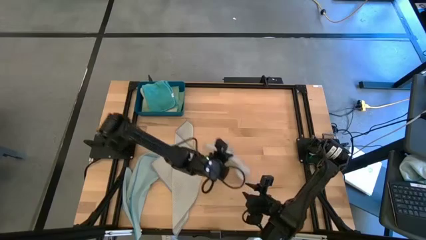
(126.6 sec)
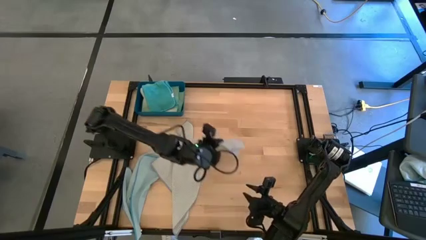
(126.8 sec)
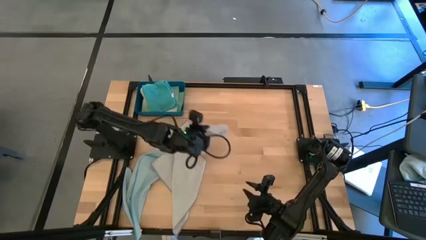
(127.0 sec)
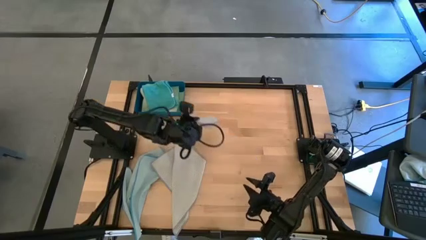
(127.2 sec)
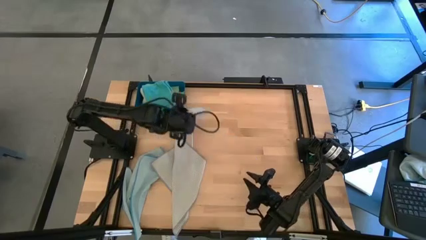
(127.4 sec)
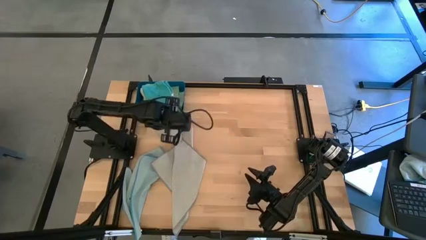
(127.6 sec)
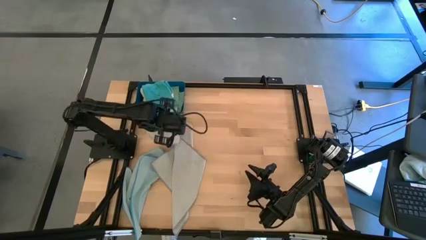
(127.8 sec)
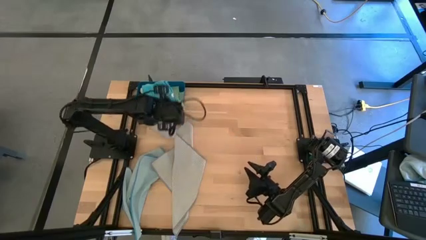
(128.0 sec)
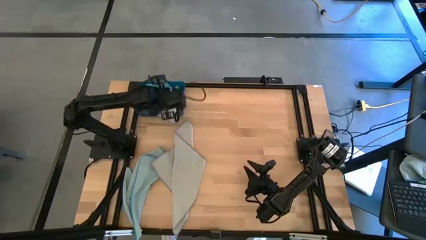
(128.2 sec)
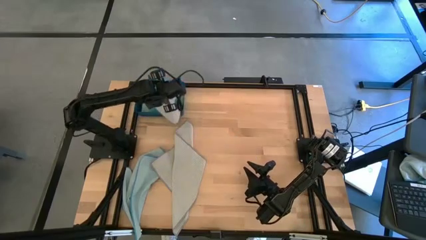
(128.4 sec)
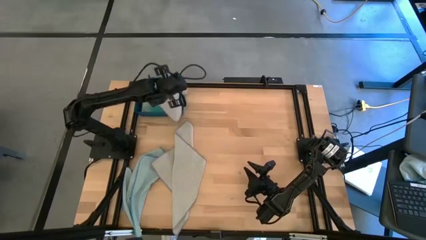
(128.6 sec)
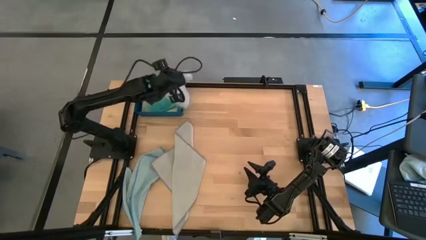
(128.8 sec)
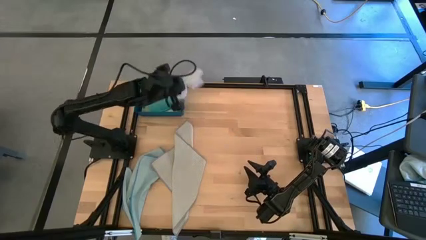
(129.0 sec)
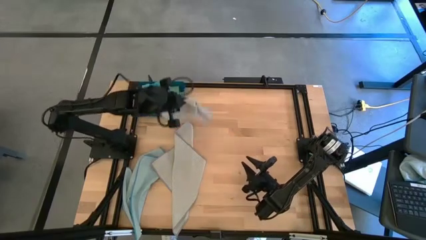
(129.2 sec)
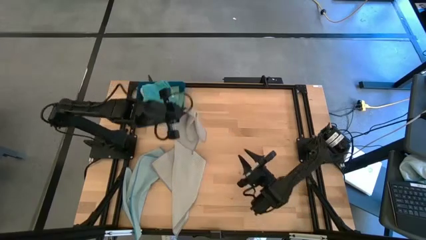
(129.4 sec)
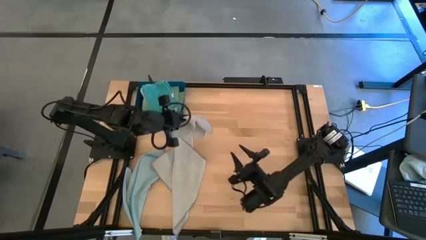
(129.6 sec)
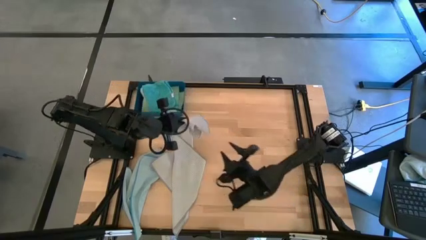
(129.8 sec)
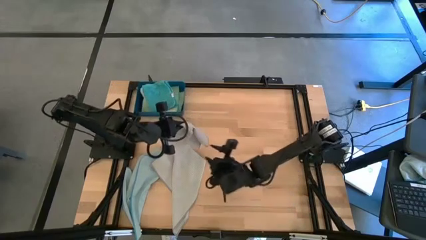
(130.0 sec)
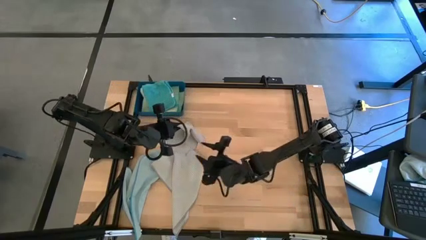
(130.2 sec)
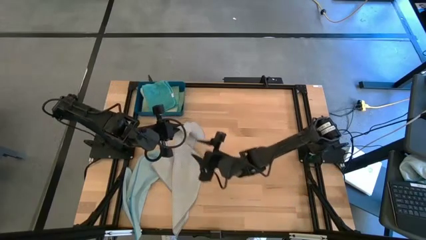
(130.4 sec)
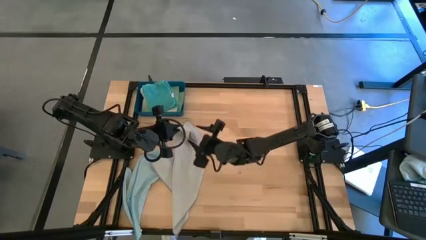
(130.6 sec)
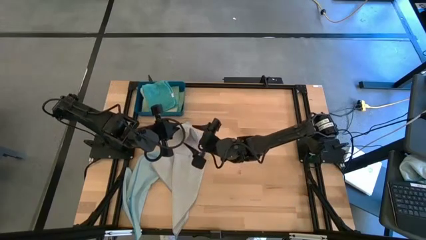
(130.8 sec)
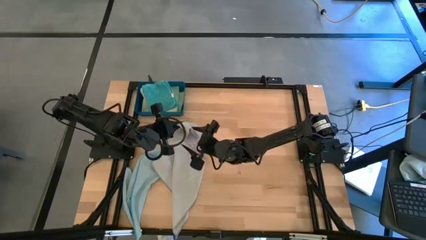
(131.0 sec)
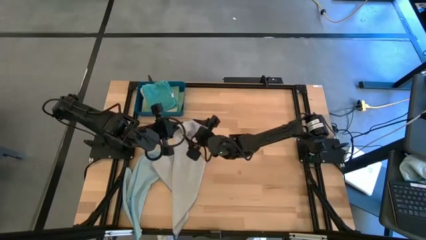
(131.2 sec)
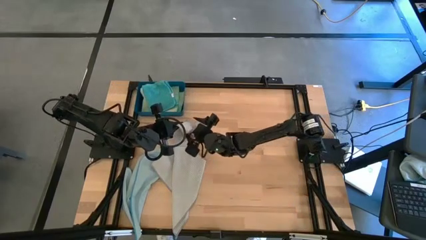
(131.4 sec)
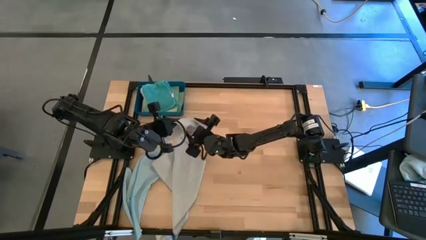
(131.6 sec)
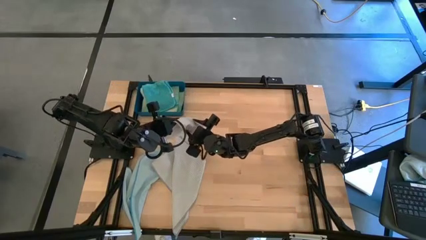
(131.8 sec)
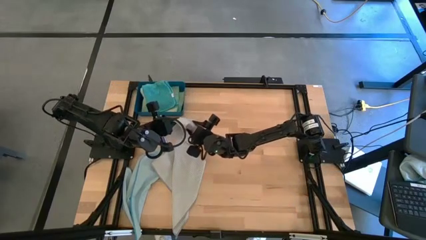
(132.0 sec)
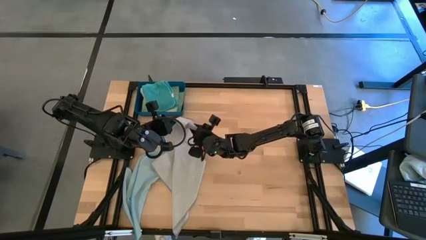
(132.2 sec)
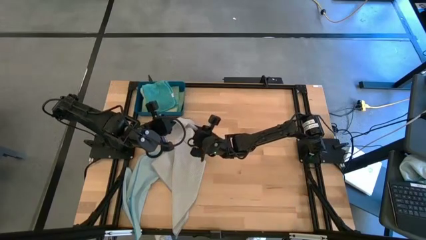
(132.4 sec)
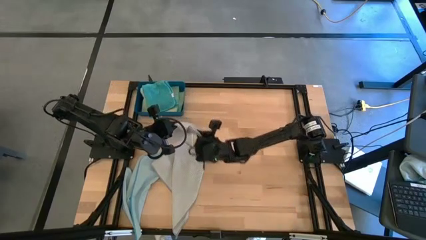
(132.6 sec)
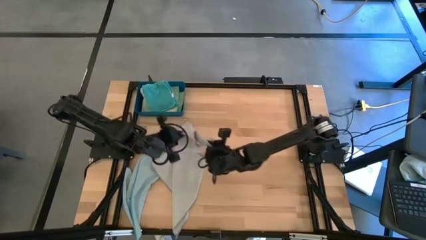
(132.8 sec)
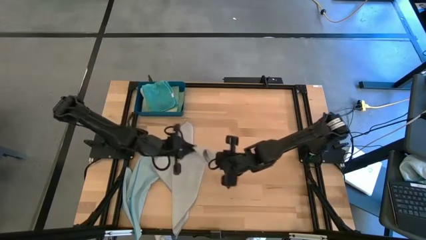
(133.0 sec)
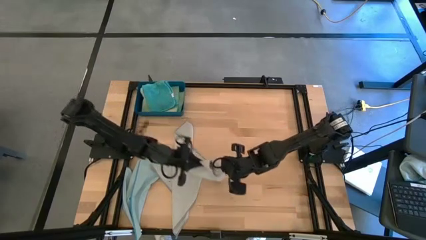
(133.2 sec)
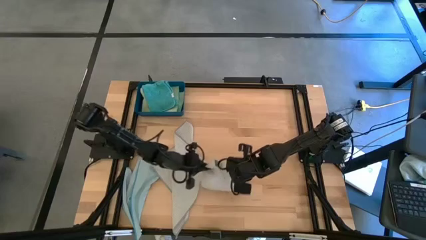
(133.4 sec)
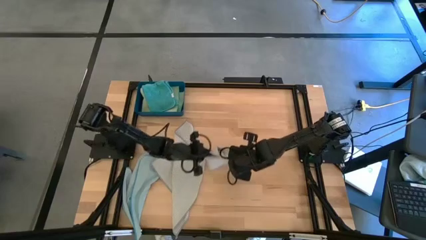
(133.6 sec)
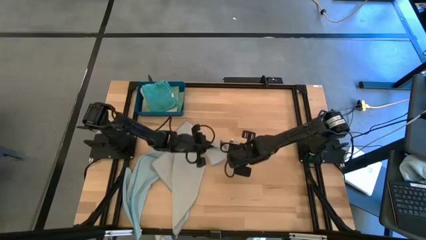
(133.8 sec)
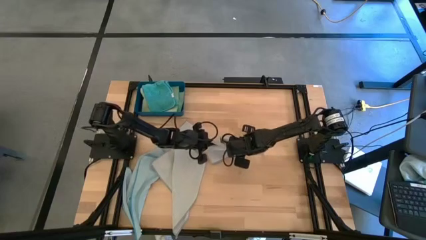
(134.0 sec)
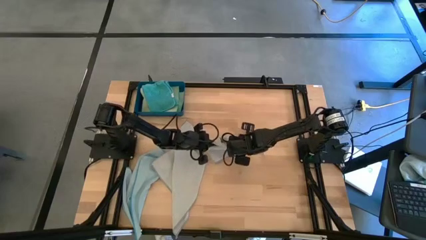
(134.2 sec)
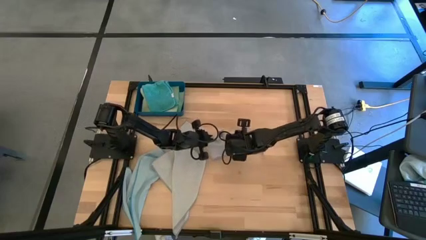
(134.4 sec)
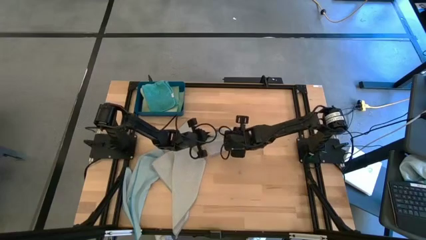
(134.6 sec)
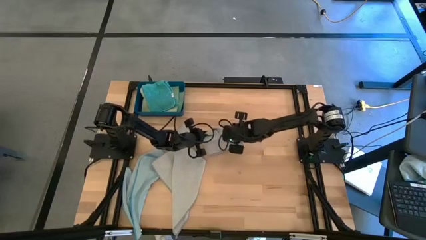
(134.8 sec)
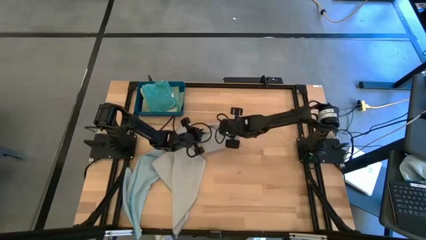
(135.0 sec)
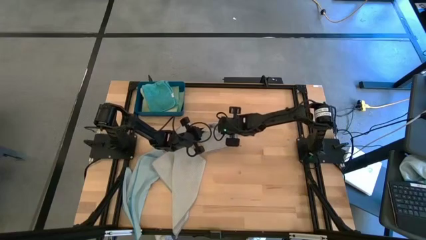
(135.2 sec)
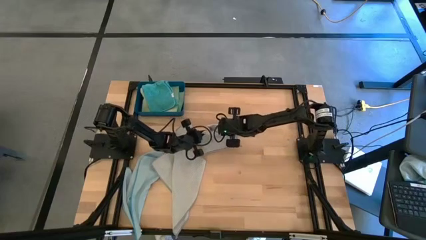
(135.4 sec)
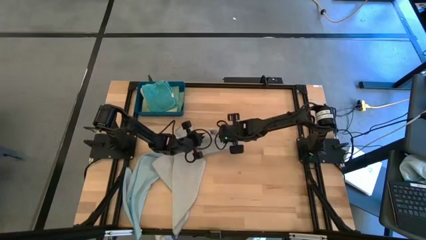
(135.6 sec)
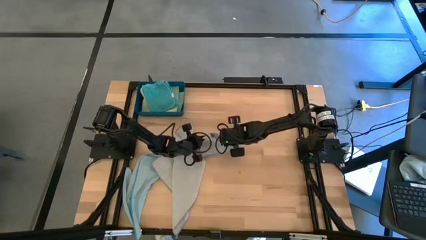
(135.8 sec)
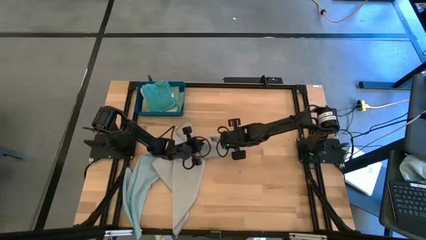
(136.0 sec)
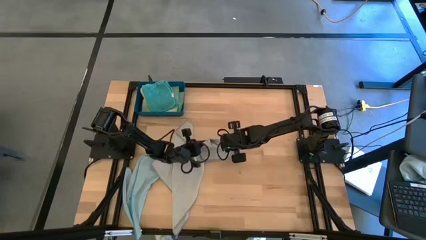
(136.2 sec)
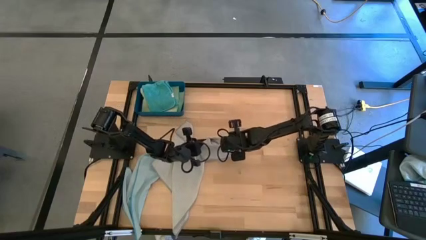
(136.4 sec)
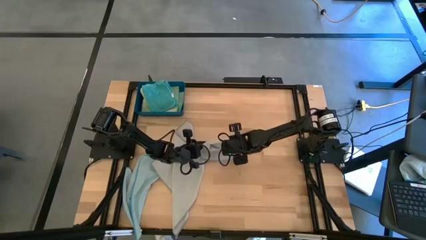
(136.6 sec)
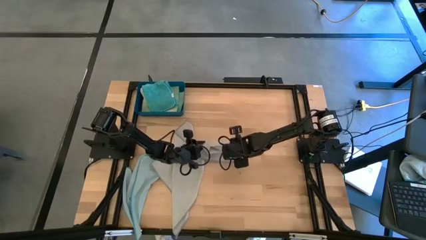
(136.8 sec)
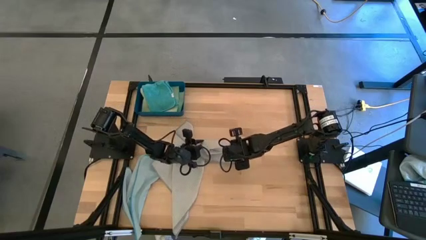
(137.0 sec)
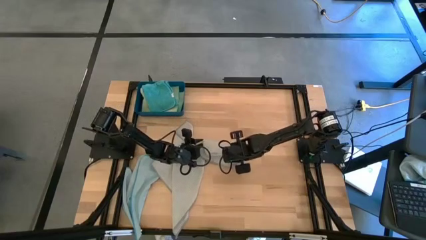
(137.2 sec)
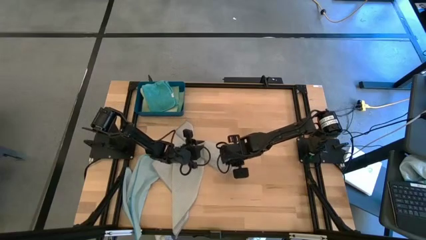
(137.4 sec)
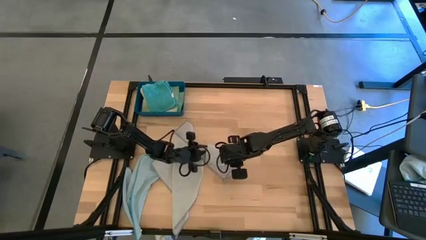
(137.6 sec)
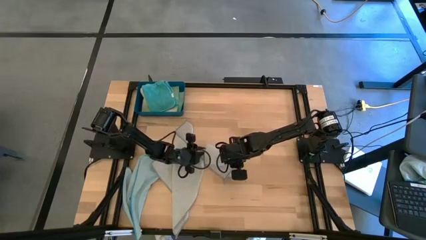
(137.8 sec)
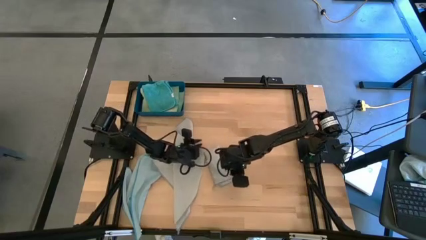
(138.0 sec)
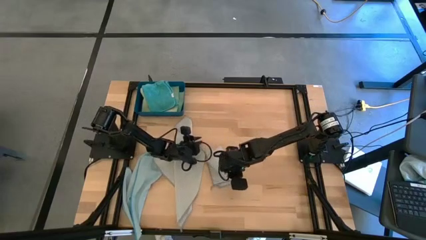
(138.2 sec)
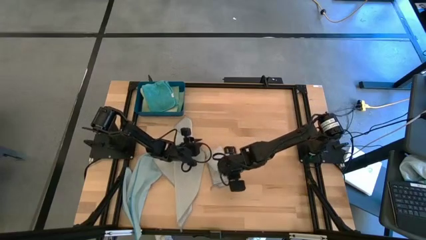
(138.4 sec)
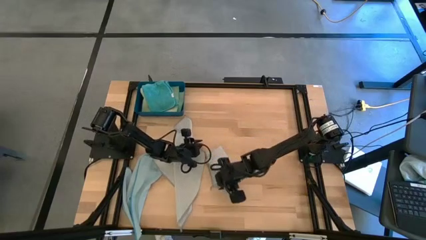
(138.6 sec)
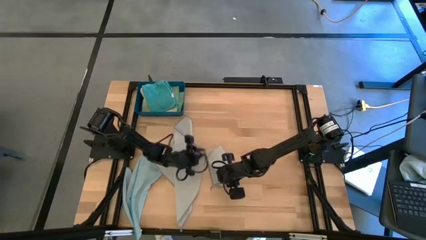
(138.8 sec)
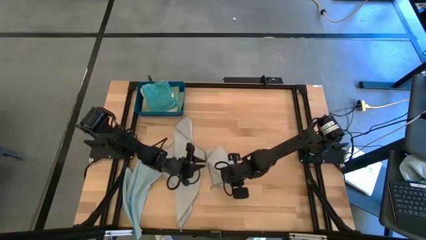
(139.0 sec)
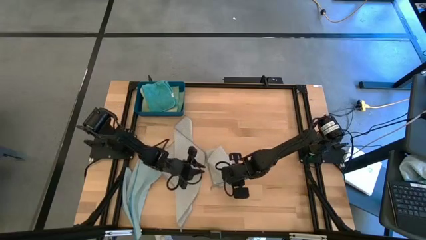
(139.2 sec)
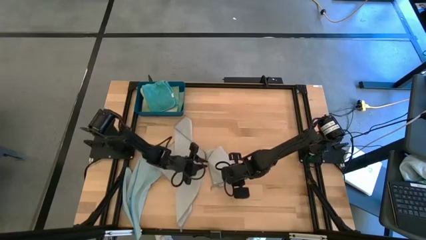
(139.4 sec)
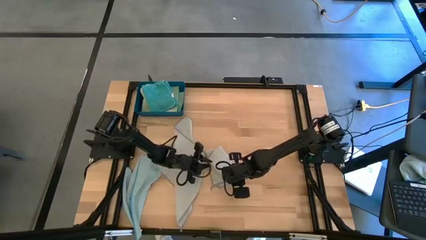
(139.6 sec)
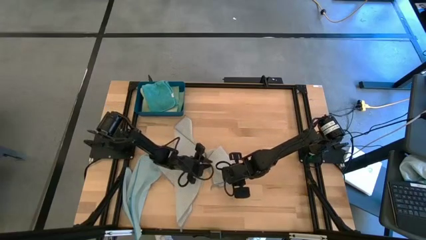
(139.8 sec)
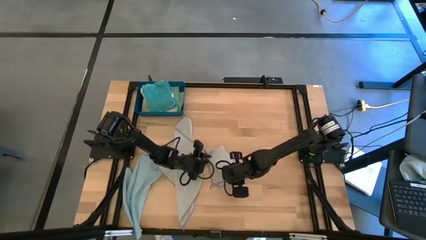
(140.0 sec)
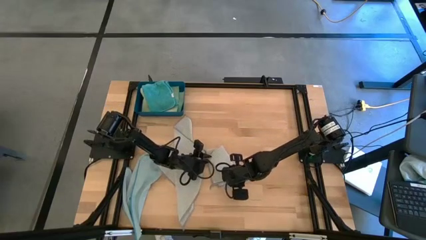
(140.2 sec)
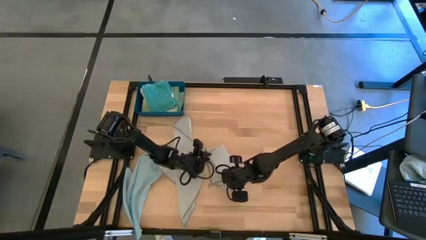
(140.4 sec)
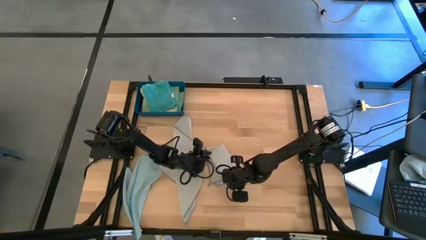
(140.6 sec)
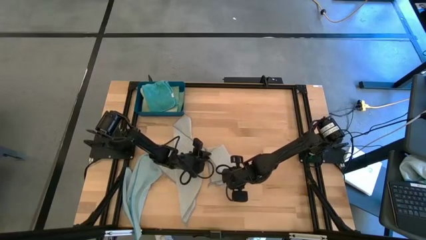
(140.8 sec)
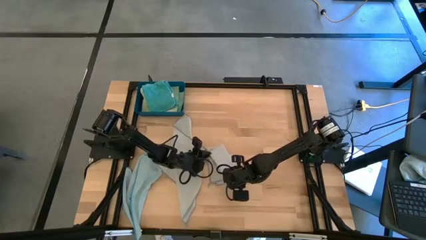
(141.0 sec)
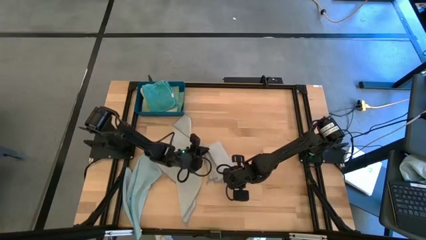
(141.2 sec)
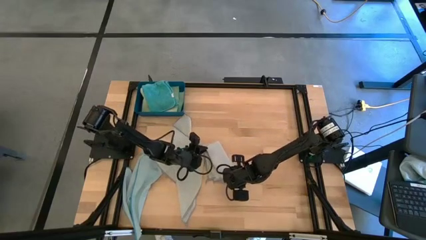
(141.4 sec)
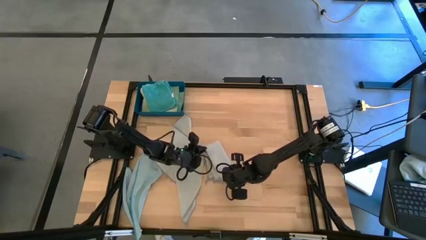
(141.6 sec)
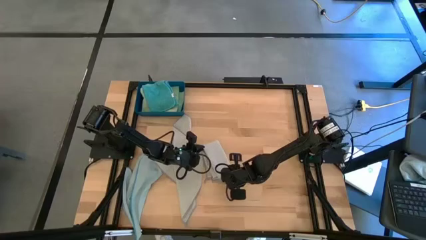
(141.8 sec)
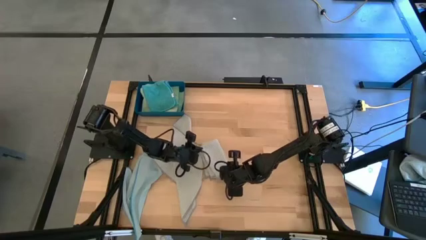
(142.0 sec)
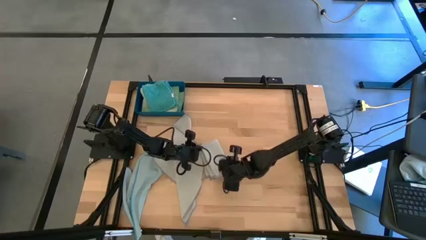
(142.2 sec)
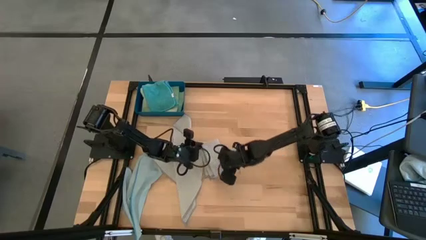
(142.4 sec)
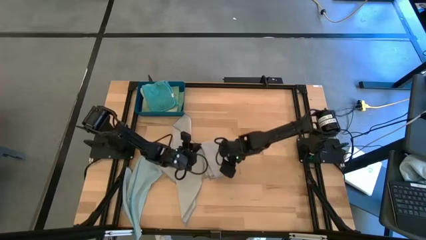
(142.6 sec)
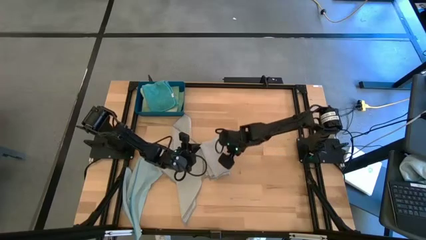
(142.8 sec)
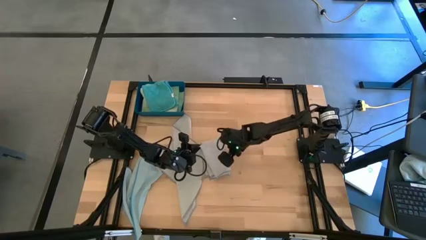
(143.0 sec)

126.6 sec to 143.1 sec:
Task: Fold microfiber towels
Fold the right gray towel
